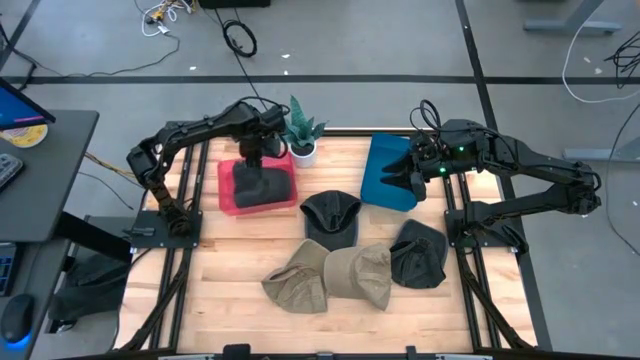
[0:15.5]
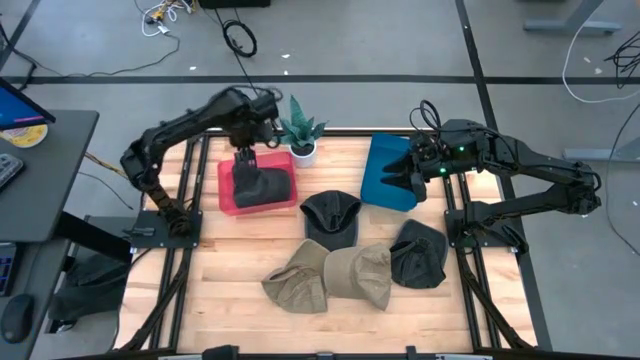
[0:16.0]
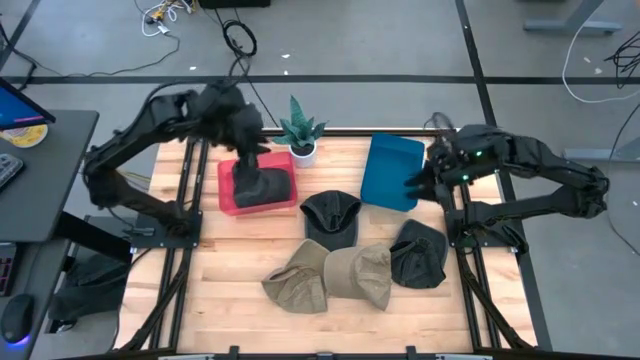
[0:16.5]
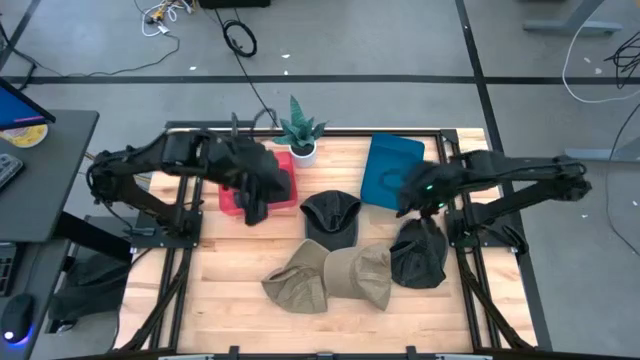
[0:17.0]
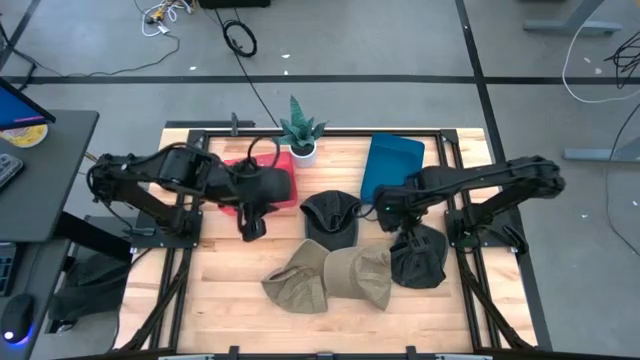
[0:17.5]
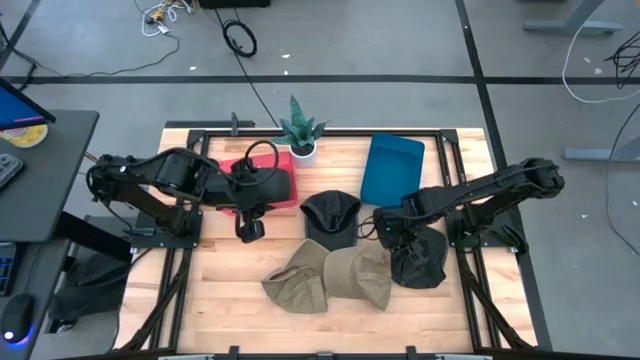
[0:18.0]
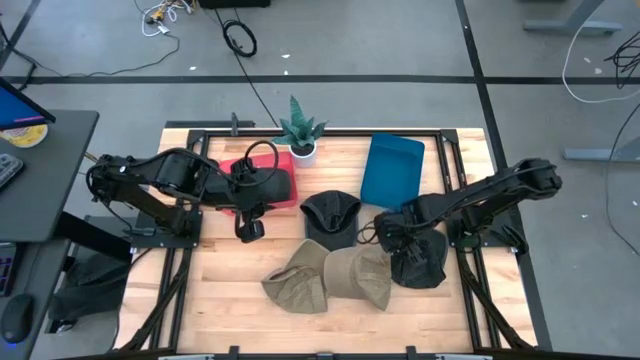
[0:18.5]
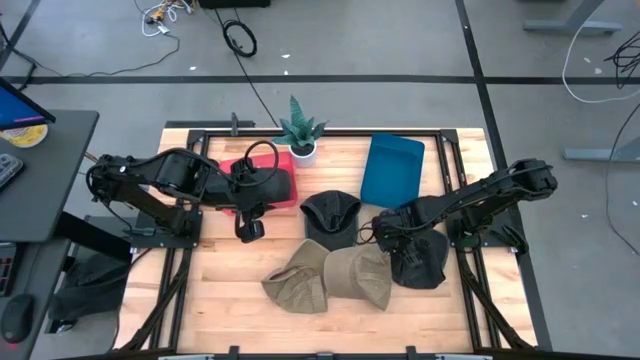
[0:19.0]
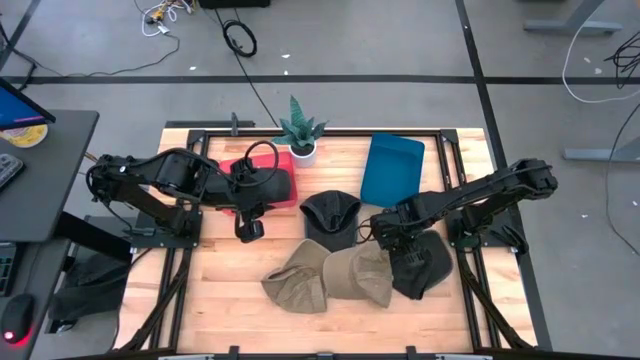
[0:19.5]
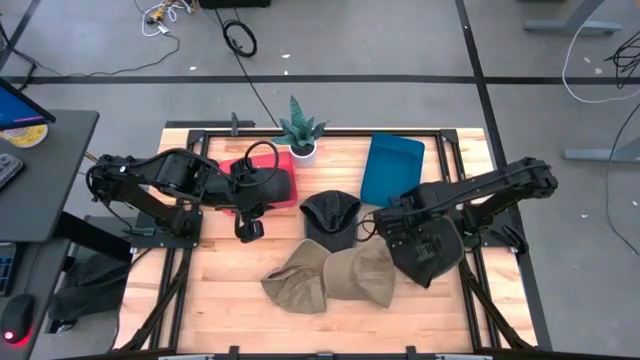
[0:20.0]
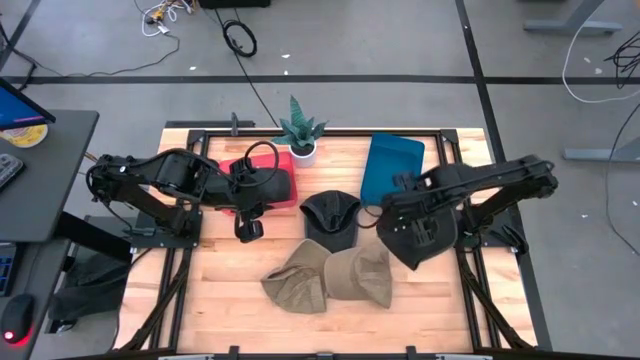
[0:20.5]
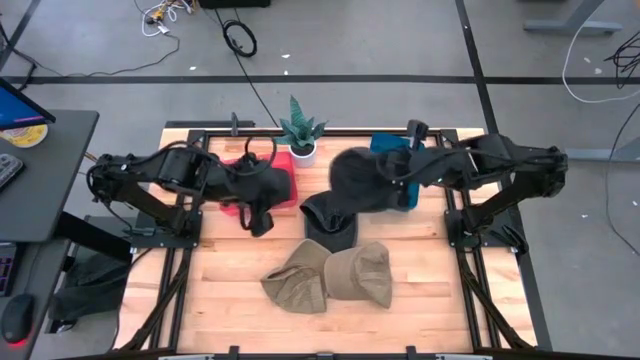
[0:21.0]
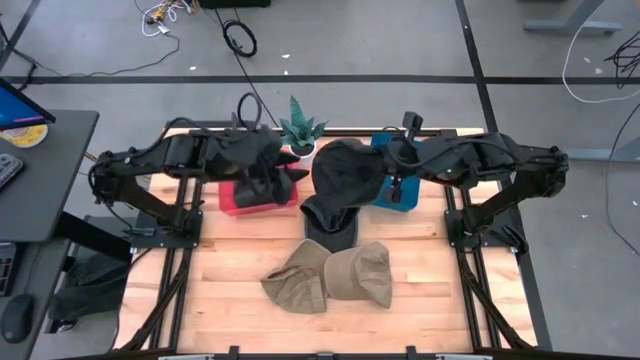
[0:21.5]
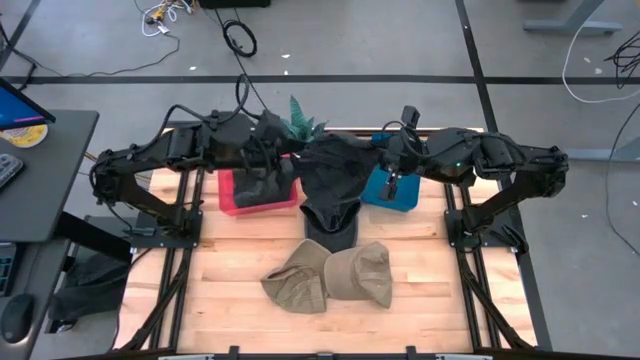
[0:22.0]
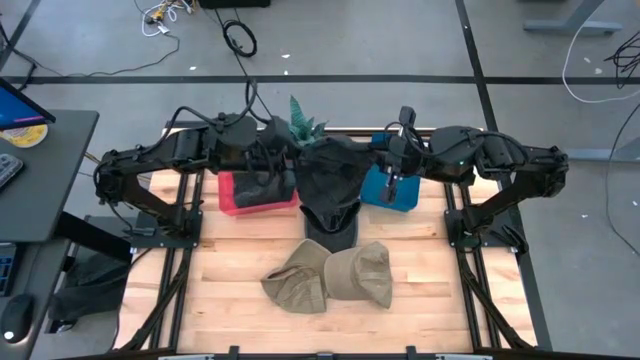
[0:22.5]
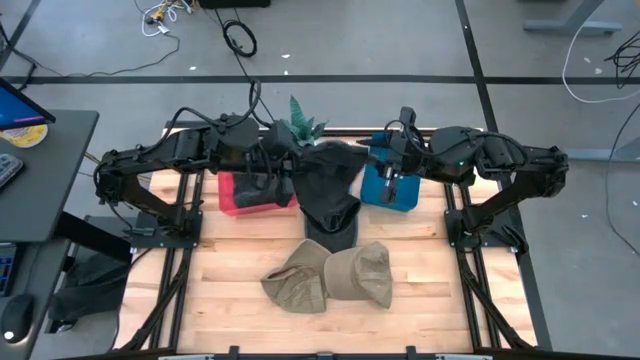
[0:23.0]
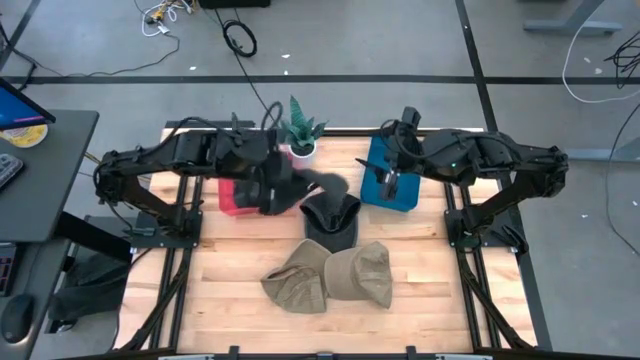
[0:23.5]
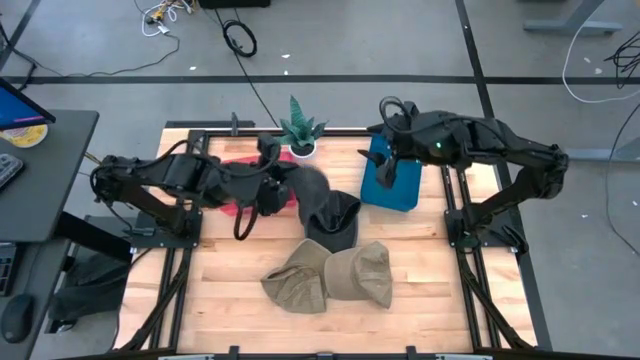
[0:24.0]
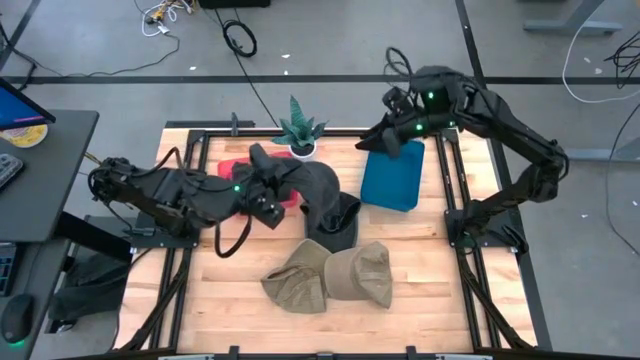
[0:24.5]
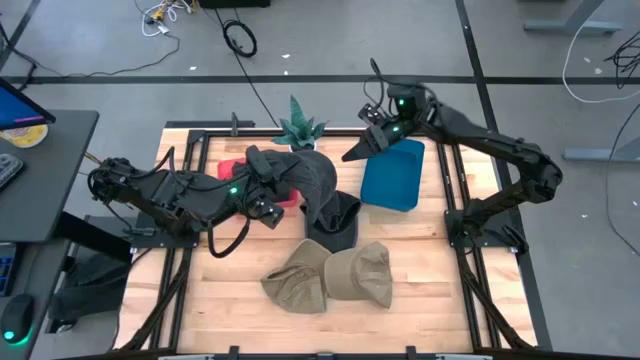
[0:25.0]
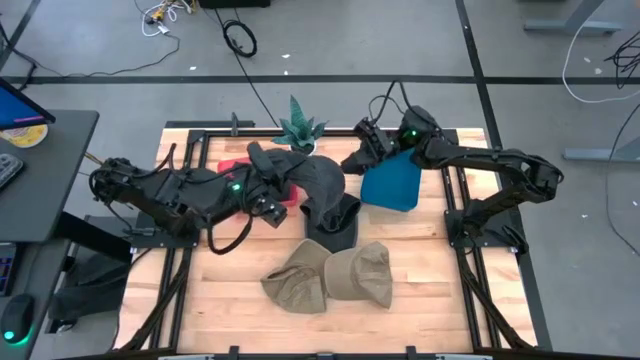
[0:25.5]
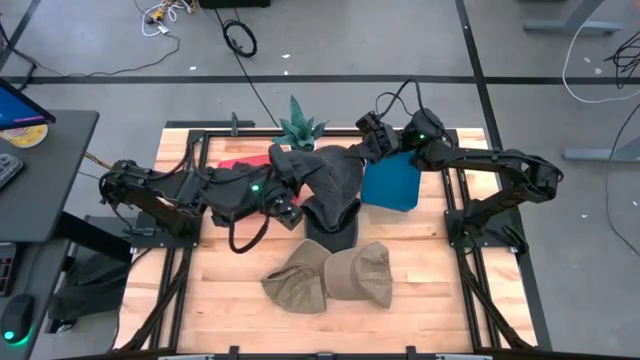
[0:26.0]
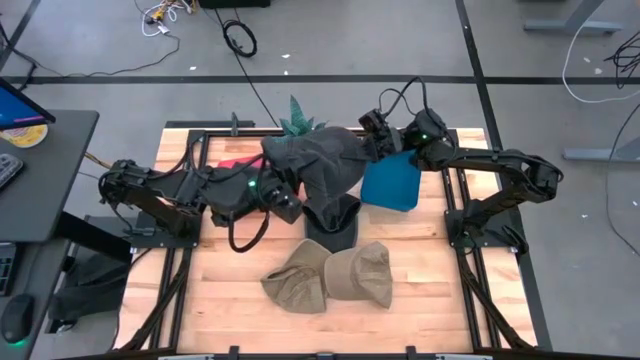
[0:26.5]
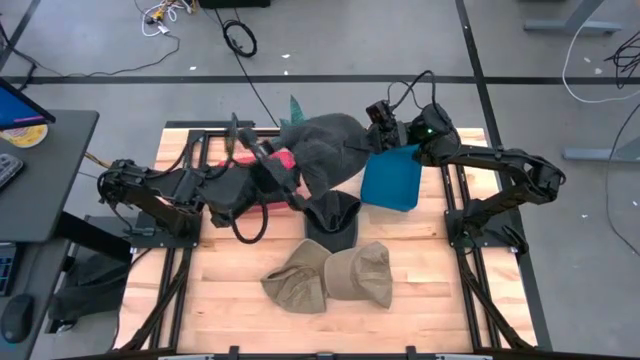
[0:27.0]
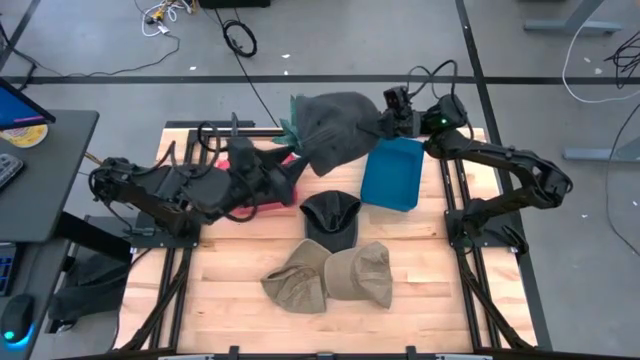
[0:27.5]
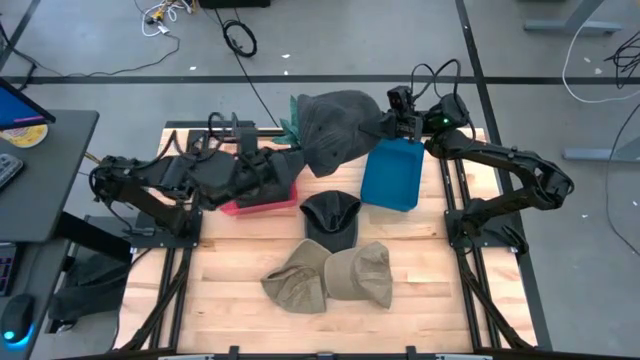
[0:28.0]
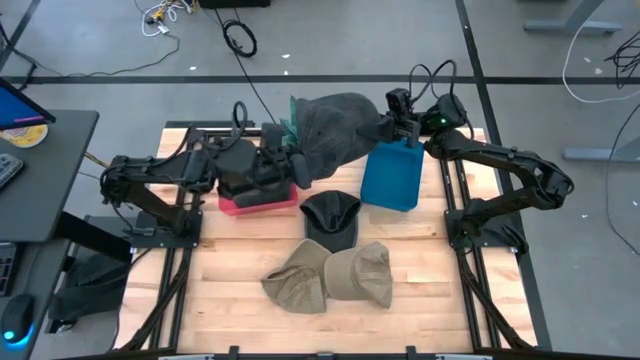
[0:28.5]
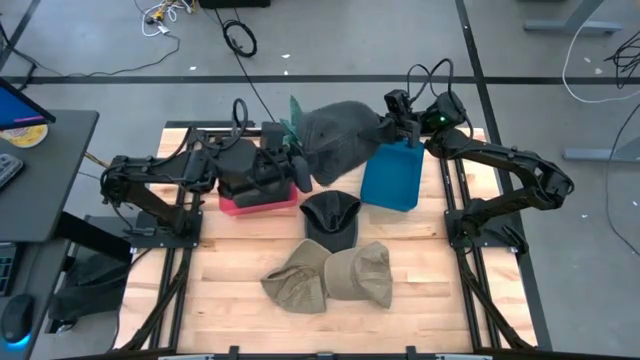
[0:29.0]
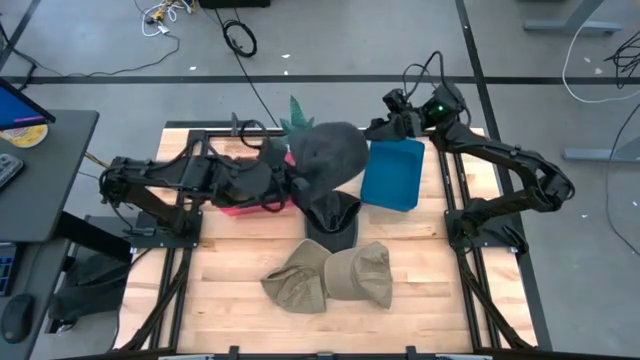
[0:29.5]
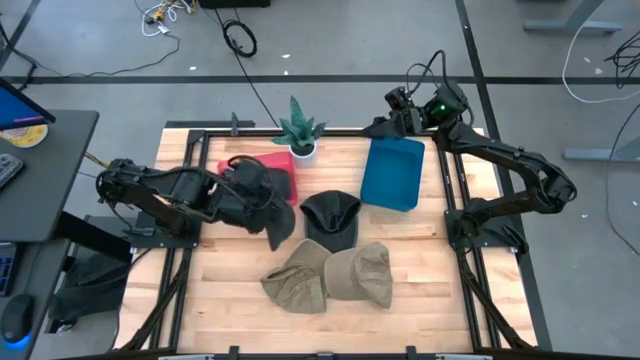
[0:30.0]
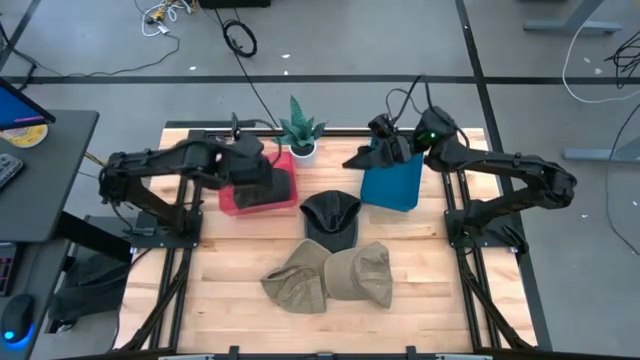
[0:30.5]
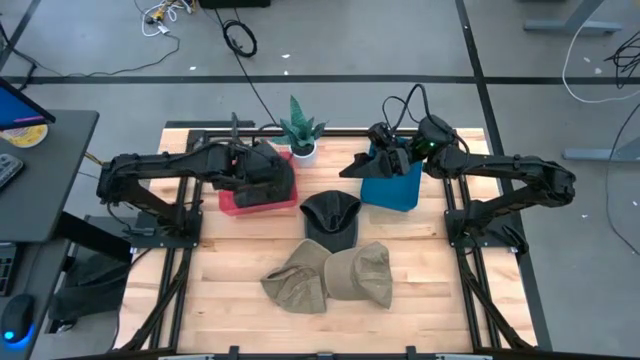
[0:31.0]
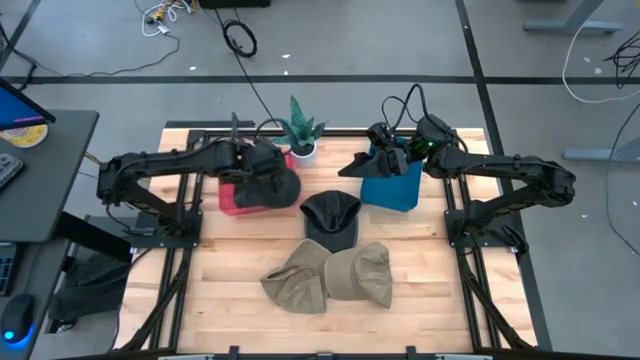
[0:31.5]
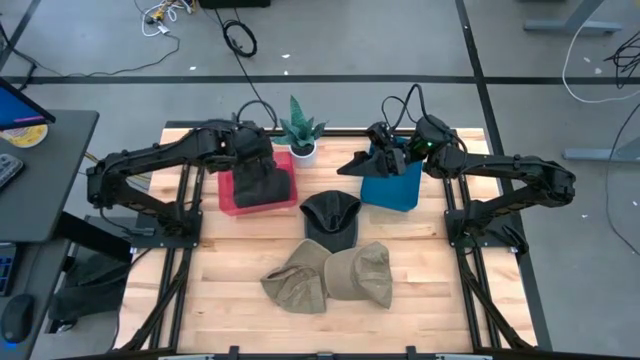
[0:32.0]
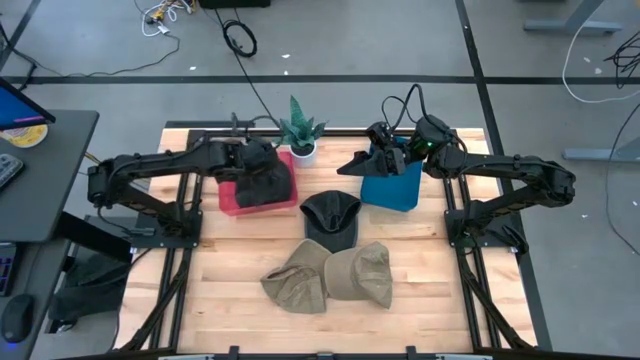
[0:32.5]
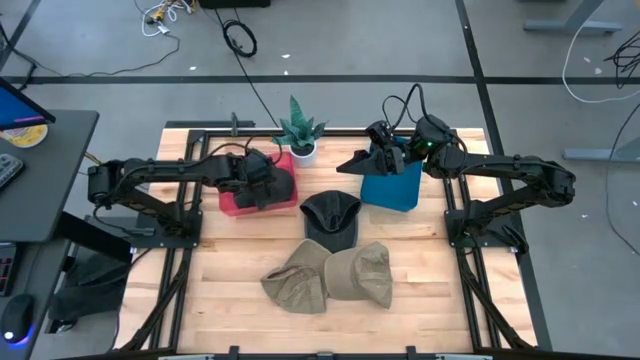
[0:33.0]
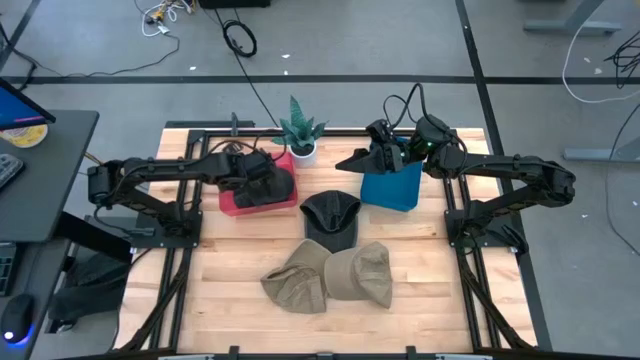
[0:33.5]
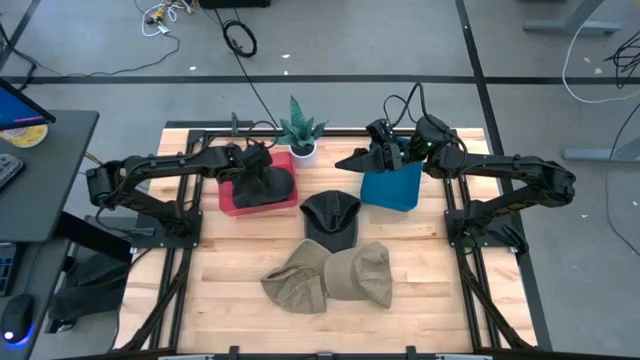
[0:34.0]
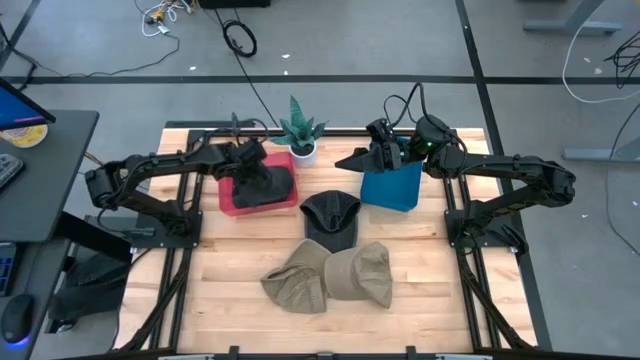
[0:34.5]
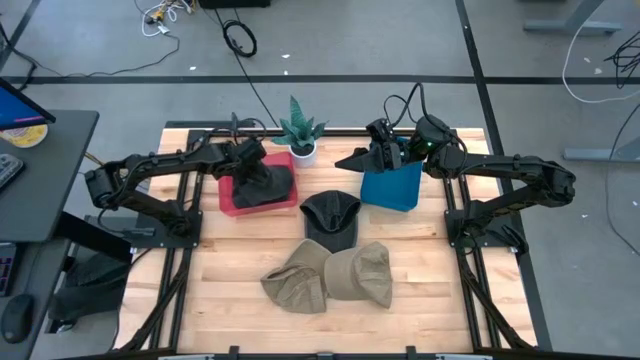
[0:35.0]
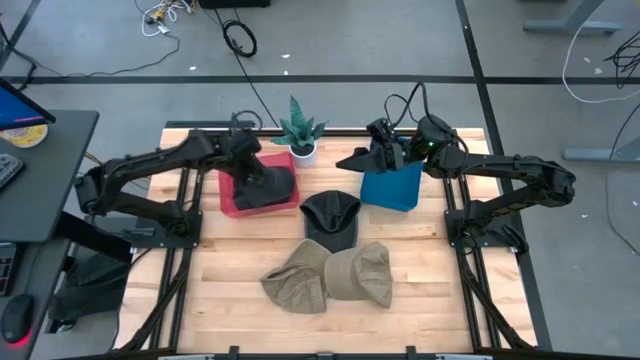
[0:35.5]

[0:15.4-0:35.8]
Task: Pick & Place hat
Put the right black cap into the red bin
